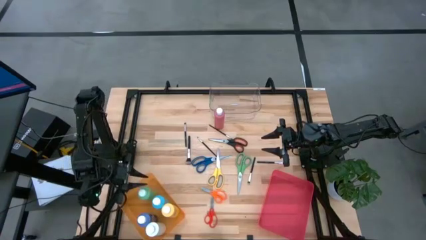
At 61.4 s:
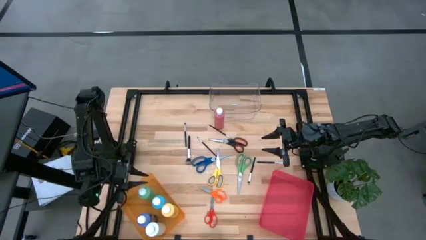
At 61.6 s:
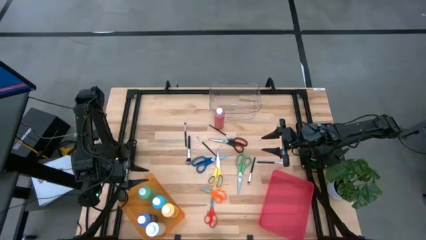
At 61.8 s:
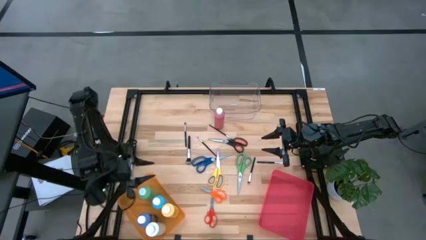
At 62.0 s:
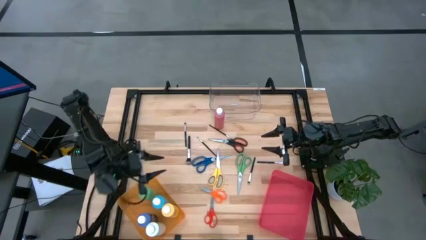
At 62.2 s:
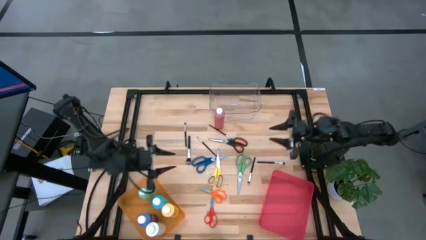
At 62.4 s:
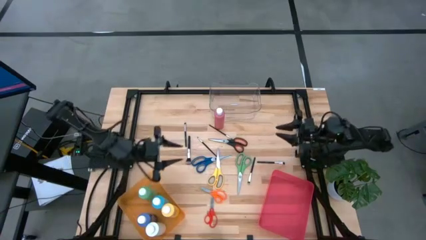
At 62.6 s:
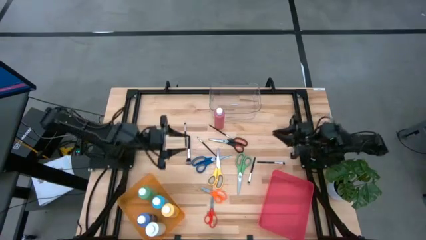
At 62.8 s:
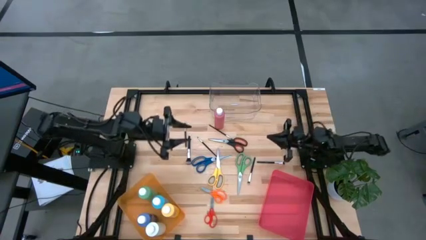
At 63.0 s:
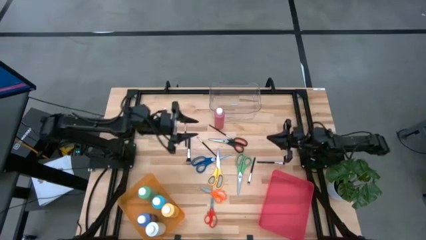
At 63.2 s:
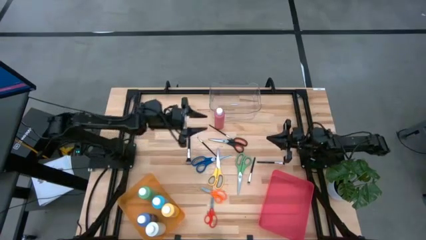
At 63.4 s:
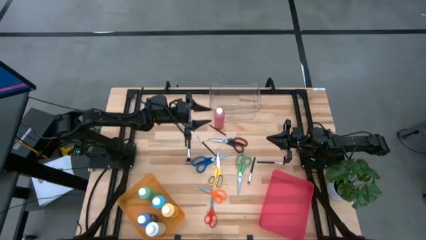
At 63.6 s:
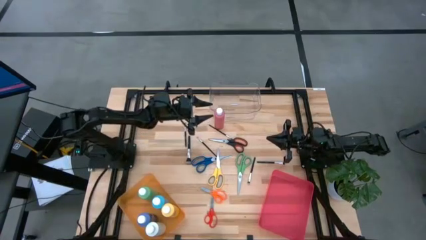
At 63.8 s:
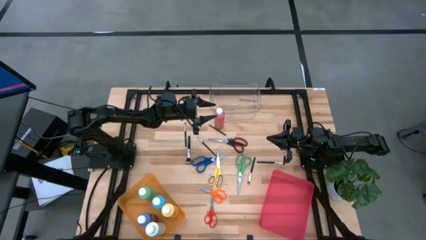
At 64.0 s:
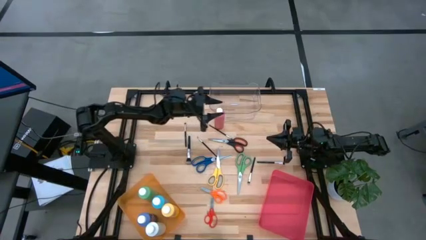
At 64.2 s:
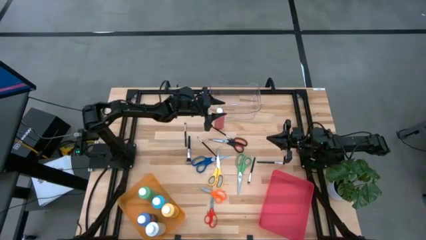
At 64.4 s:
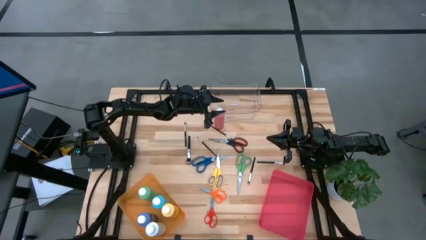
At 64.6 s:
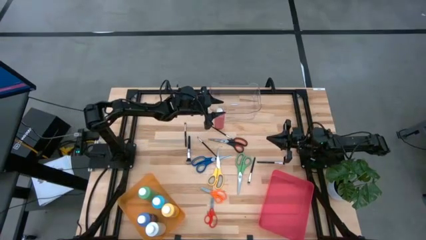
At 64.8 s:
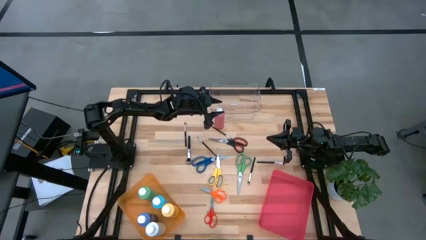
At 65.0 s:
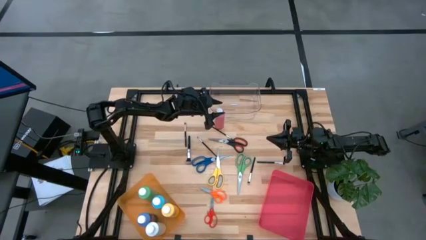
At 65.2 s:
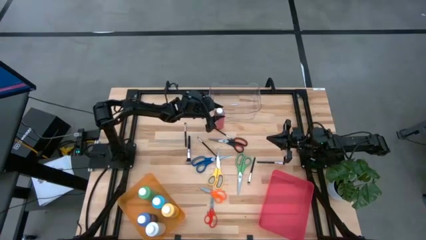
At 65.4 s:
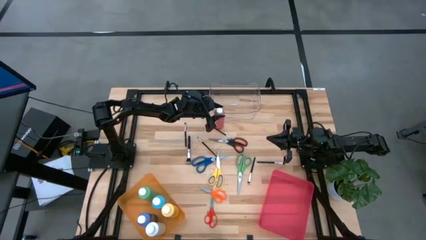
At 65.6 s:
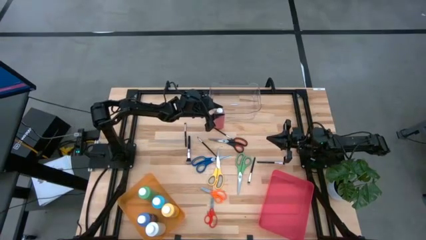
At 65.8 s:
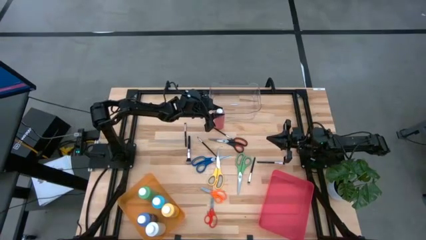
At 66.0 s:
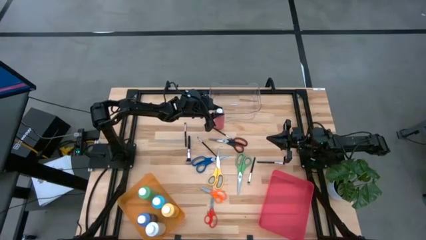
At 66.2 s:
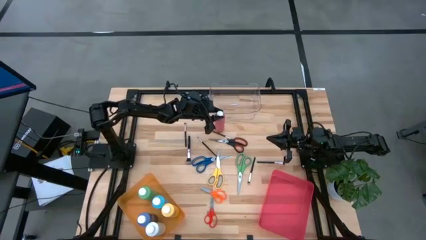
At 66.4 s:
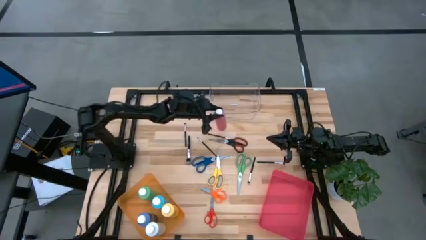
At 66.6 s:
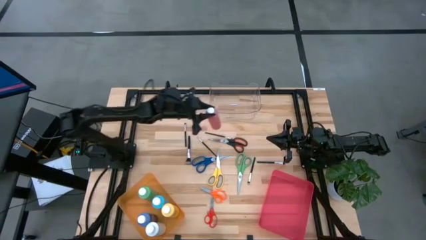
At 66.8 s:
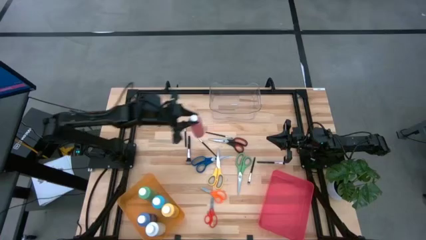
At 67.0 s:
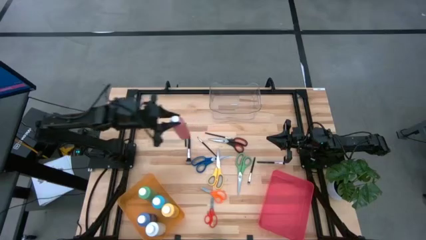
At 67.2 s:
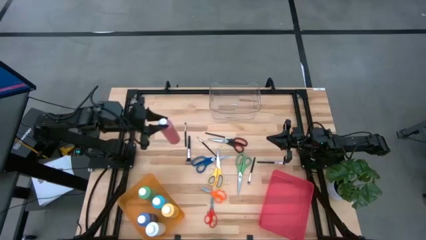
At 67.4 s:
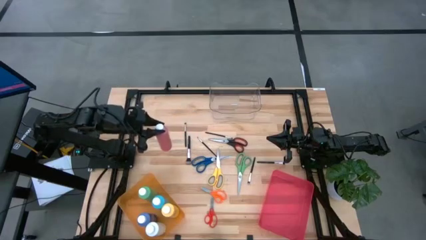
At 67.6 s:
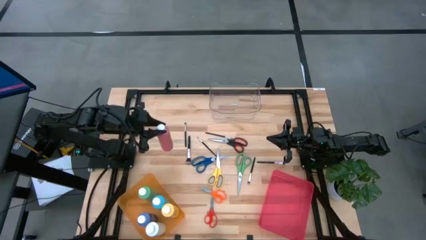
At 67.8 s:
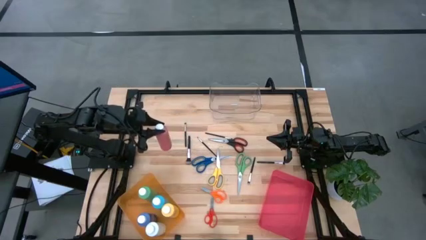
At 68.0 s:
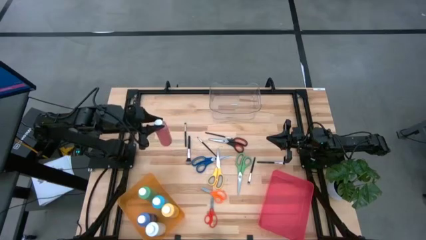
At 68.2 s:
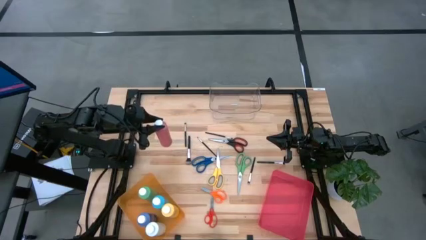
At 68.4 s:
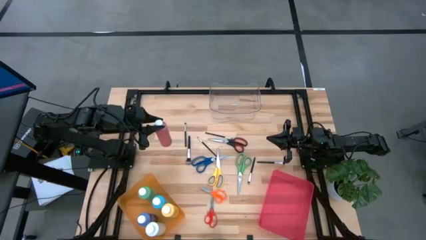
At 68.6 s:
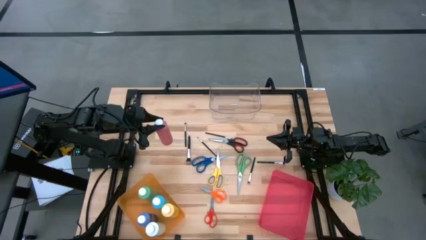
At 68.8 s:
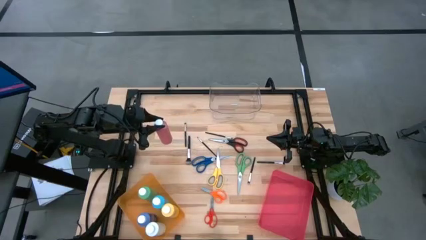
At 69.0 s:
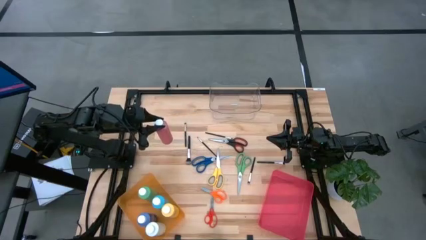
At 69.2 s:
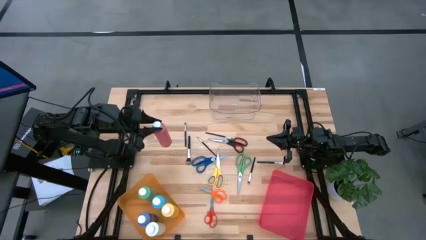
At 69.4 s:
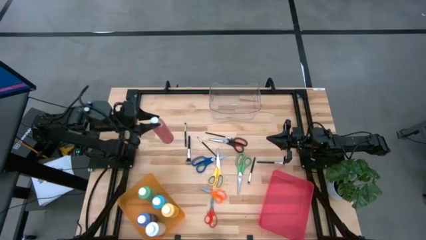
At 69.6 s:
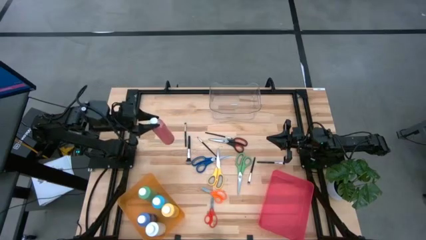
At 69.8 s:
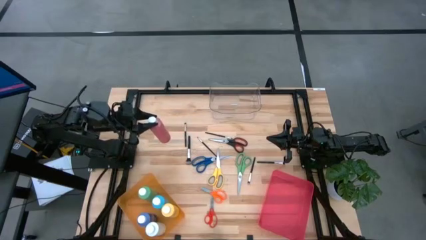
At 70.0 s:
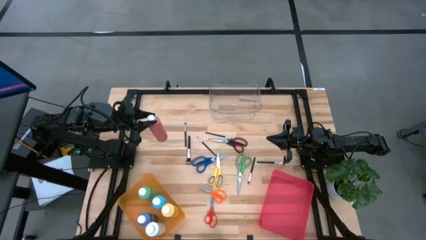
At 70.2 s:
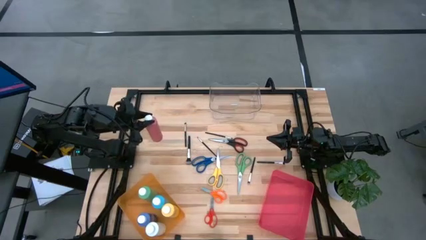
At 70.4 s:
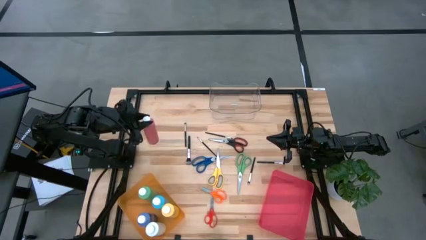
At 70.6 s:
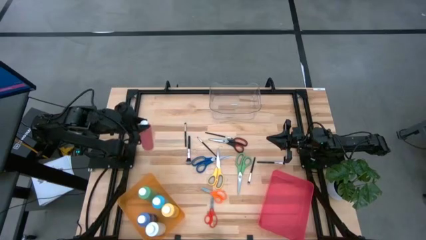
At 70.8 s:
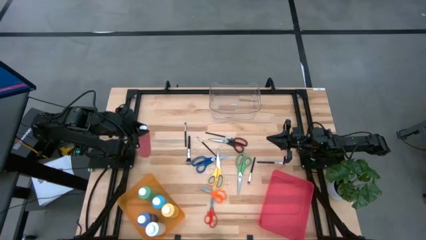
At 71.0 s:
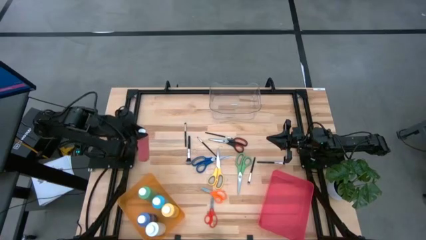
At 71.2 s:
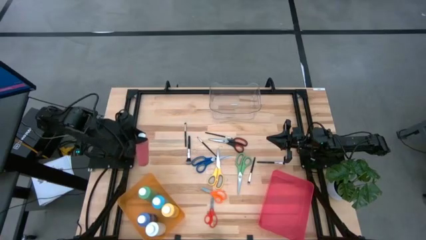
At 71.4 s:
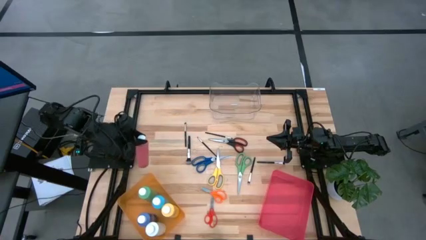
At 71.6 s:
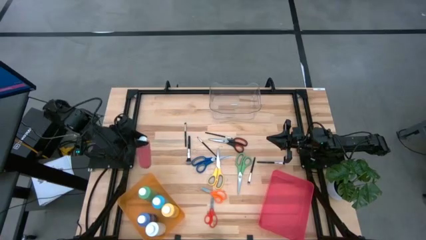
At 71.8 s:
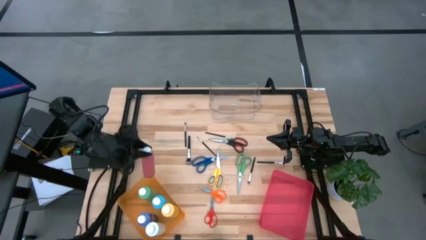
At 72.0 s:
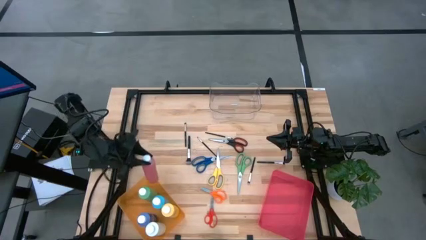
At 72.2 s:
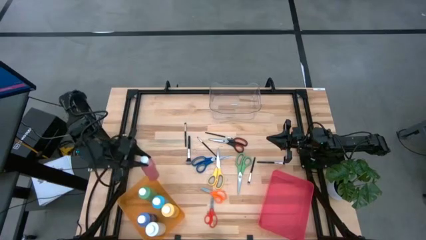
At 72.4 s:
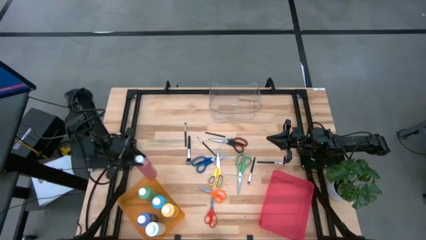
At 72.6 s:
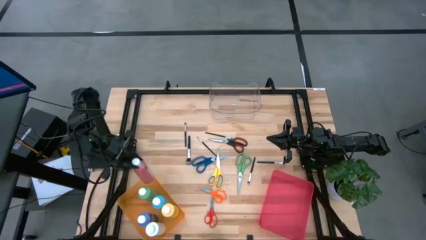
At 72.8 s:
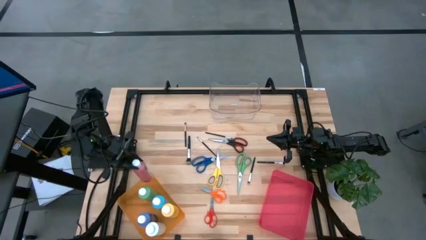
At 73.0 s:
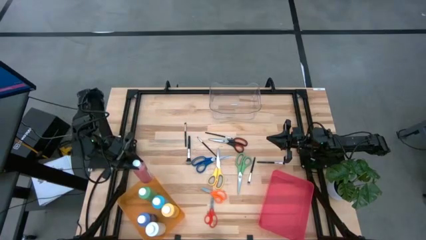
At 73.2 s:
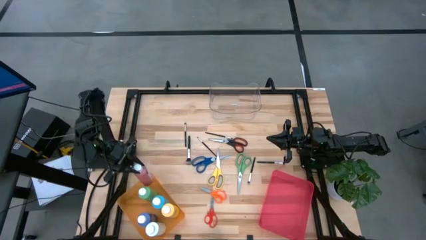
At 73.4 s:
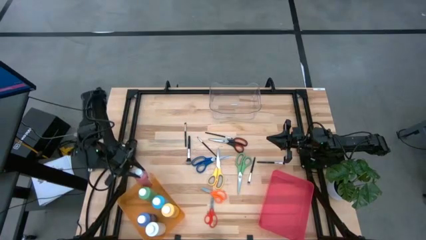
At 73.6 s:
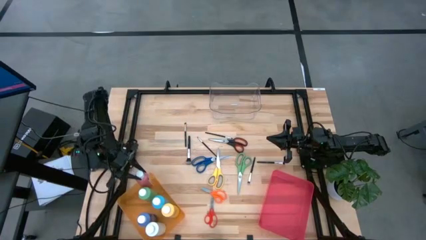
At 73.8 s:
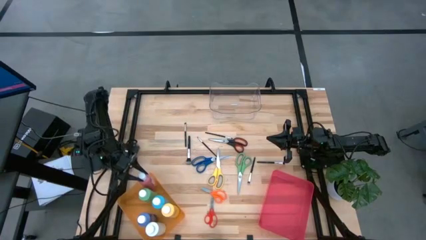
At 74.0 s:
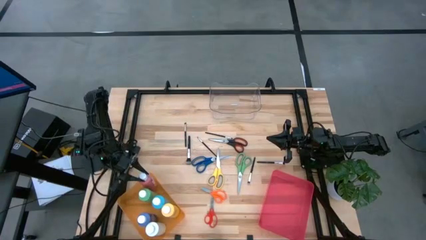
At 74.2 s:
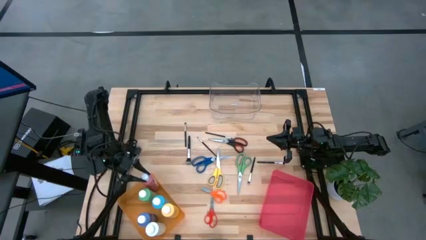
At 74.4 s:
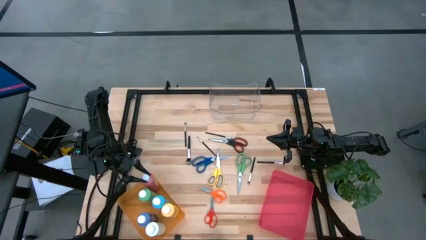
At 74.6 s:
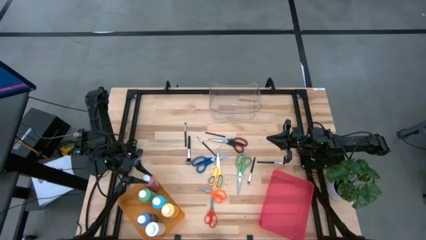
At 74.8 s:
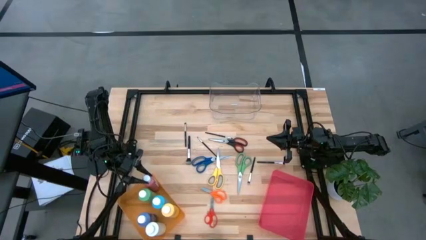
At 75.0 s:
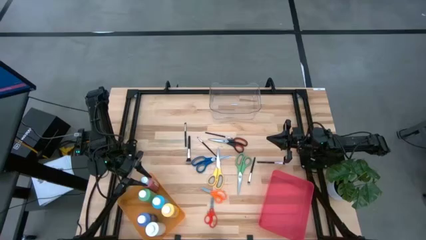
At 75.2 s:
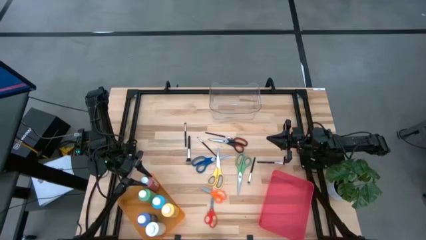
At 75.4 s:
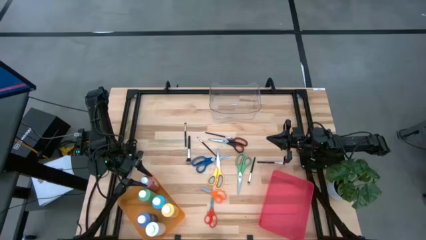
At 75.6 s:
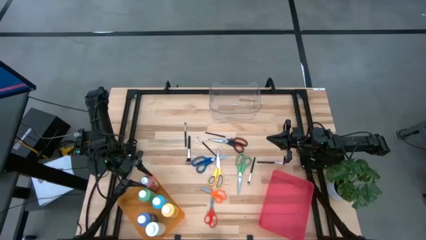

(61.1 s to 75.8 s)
Task: Pick & Place Paint Supplies
Put the red paint bottle into the orange bin
